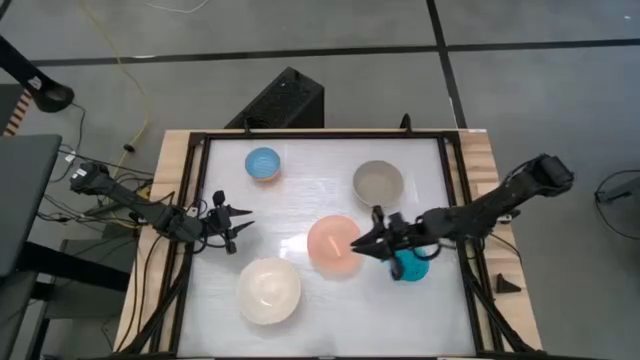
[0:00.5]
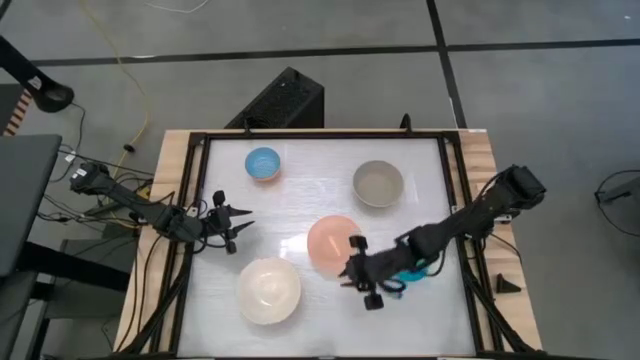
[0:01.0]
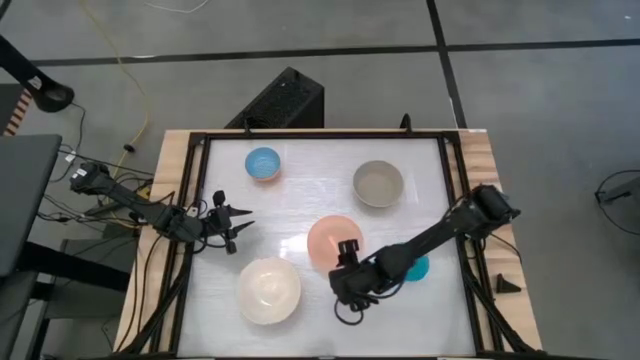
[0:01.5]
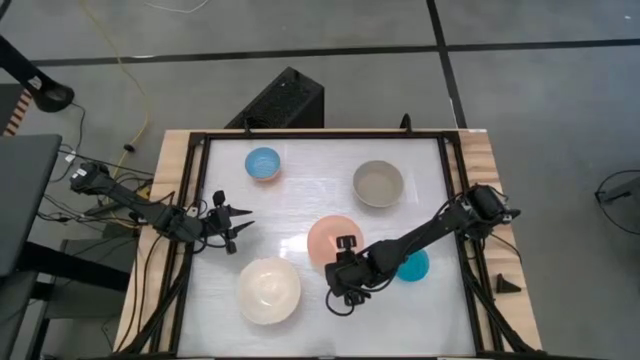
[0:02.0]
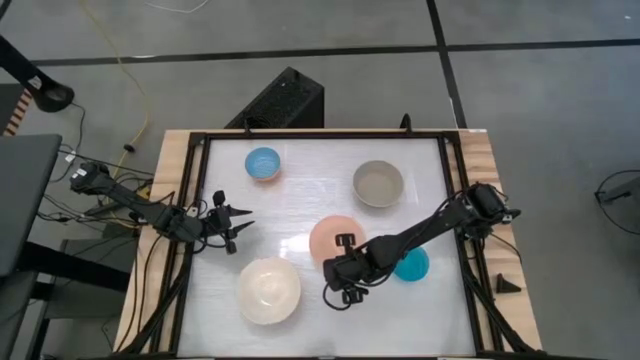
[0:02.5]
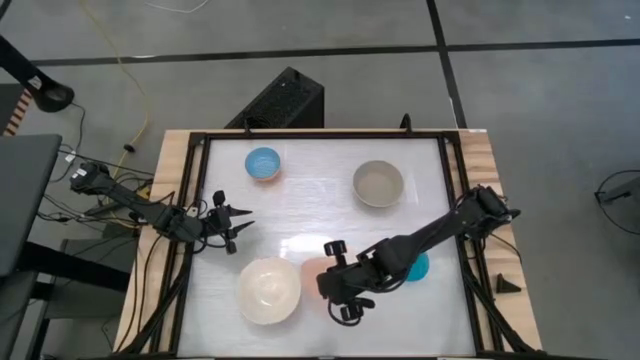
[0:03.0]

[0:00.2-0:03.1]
Stack the orange bowl on top of the white bowl

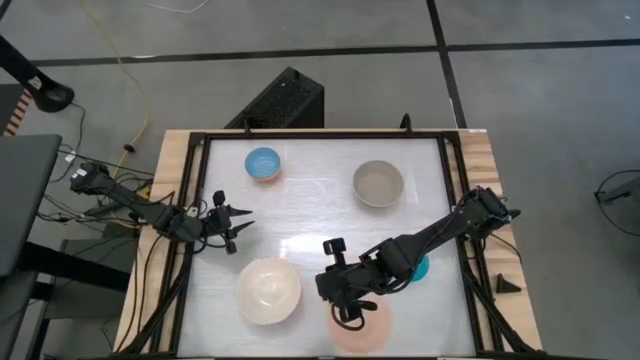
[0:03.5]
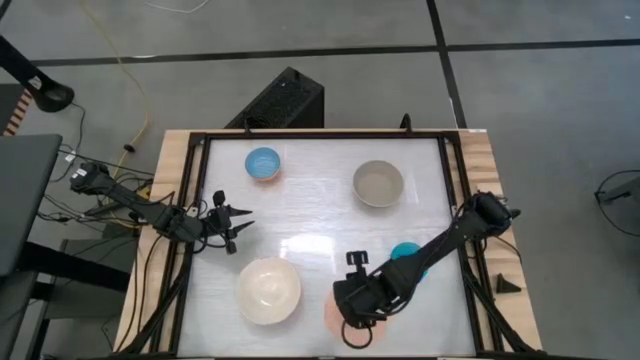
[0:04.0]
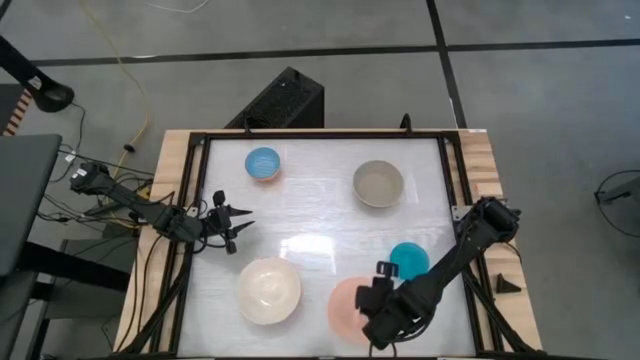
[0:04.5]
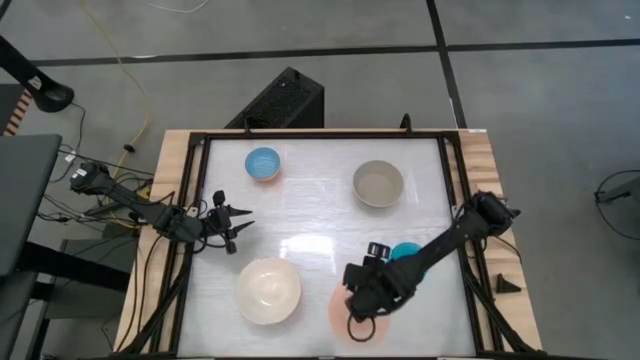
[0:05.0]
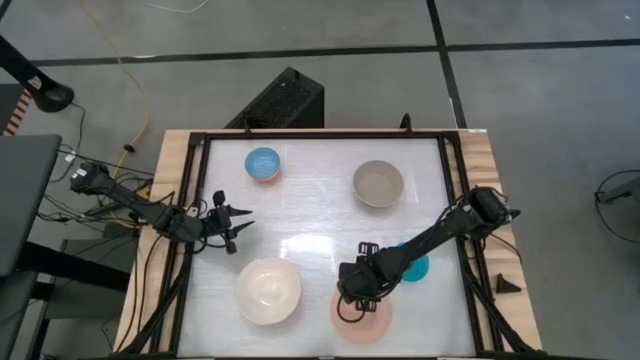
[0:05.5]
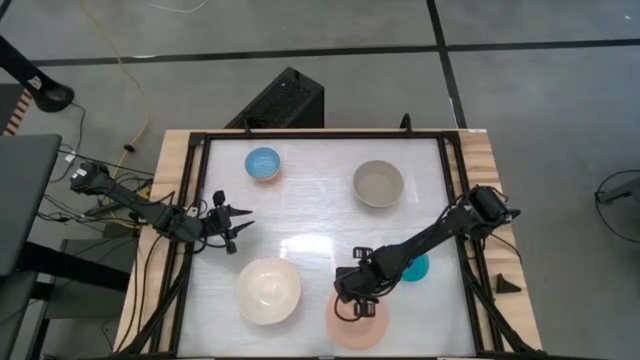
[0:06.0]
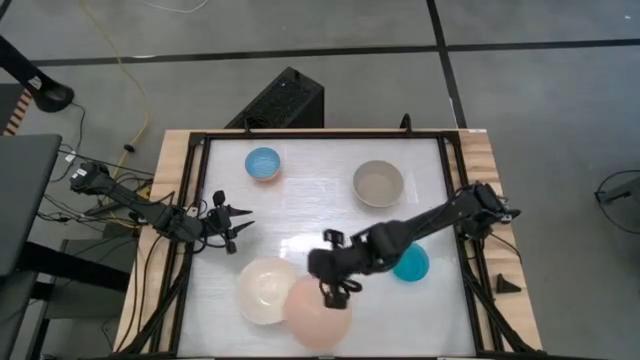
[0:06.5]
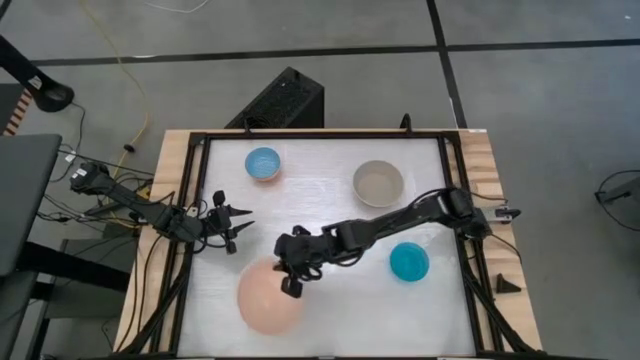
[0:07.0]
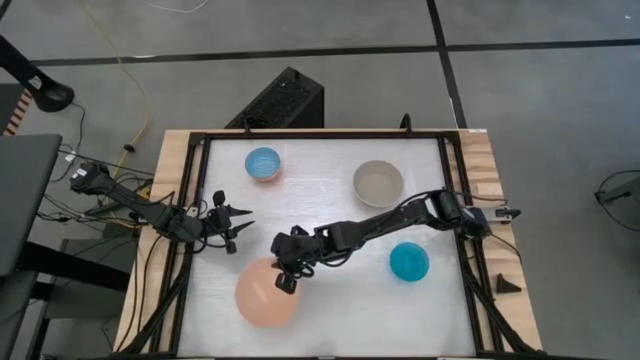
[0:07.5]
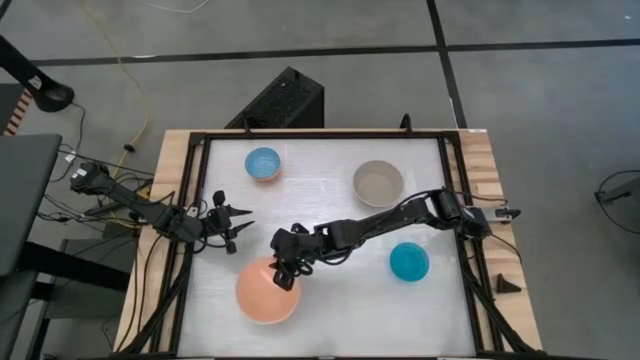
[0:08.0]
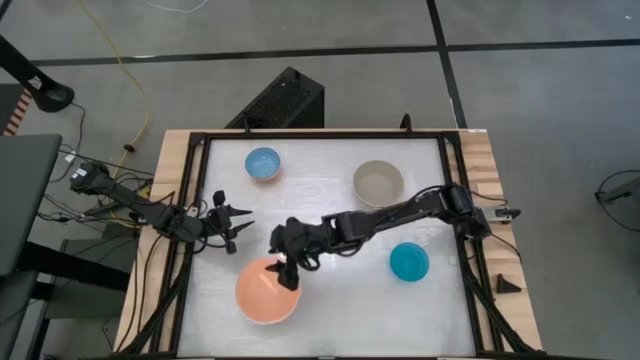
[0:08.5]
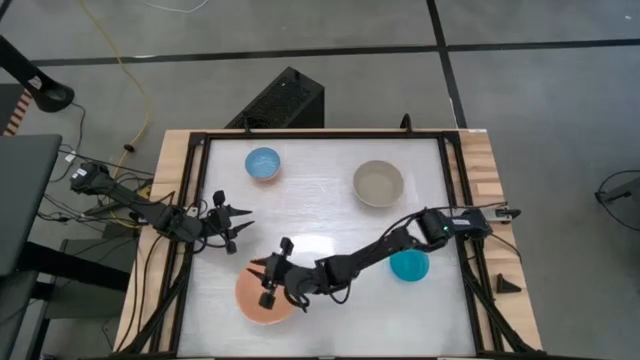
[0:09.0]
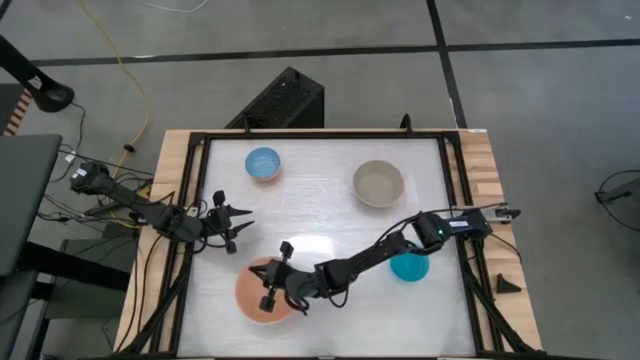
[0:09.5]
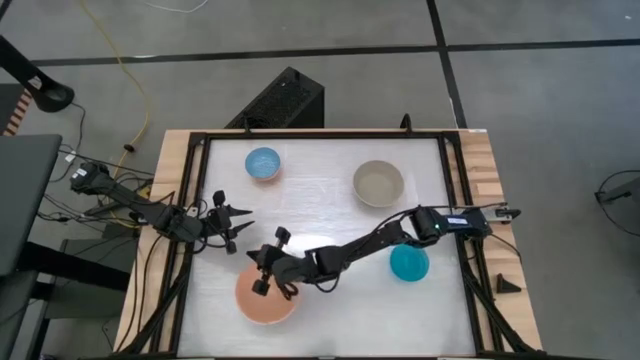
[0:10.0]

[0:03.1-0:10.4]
Stack the orange bowl on top of the white bowl

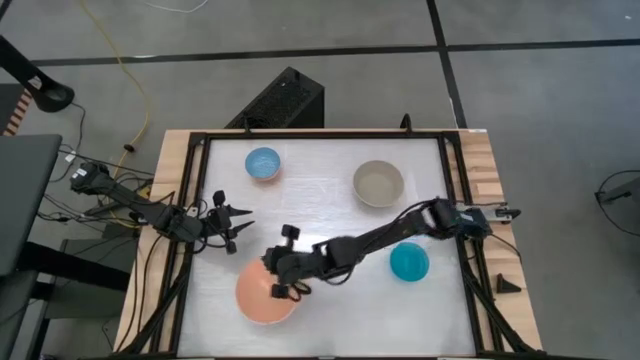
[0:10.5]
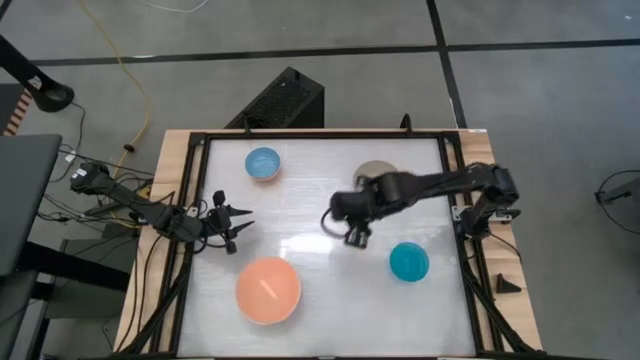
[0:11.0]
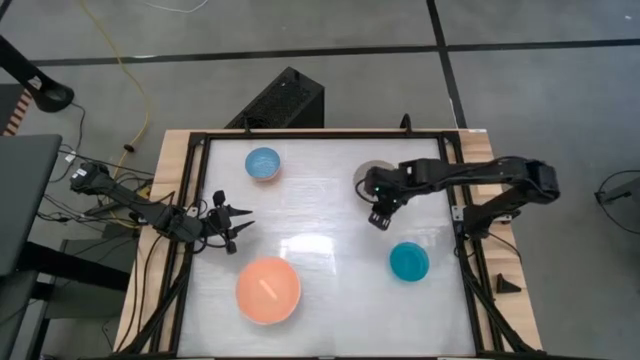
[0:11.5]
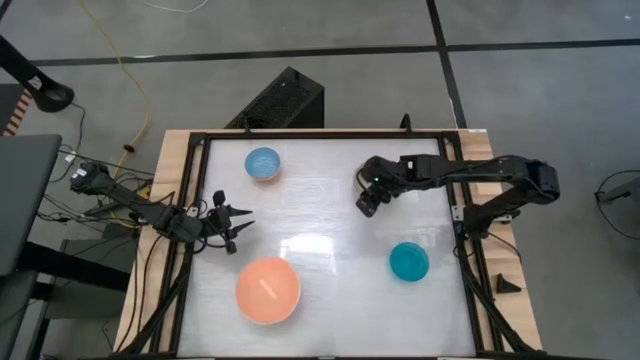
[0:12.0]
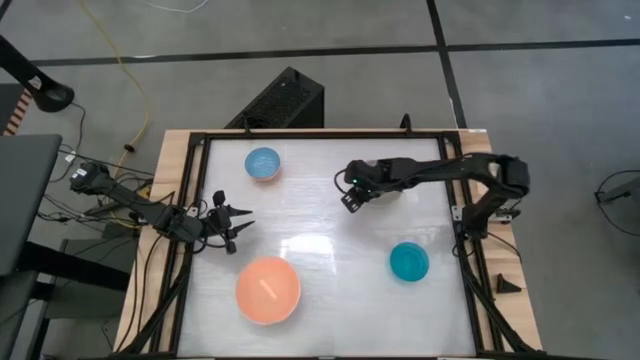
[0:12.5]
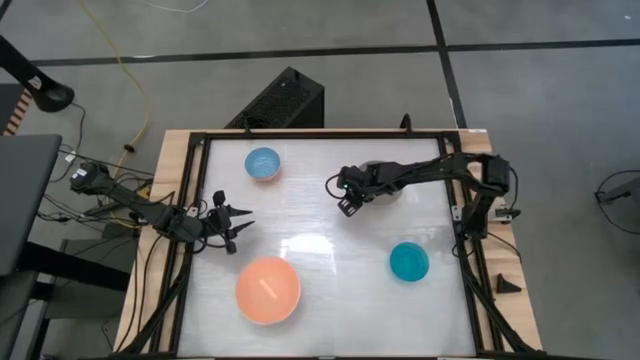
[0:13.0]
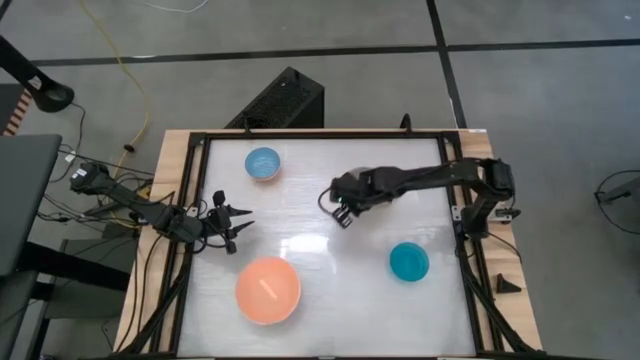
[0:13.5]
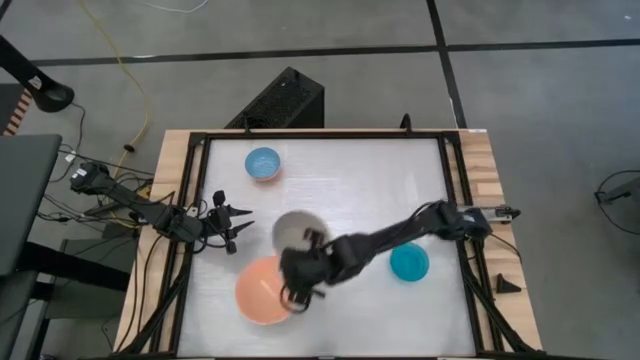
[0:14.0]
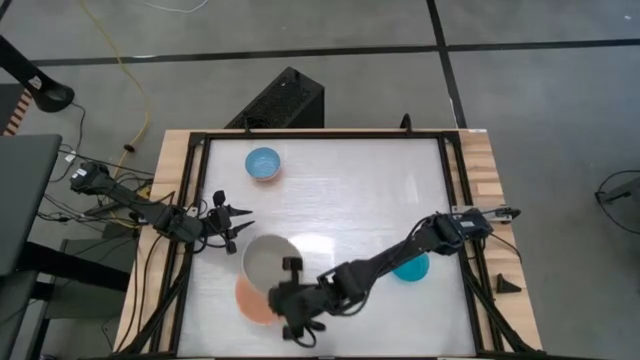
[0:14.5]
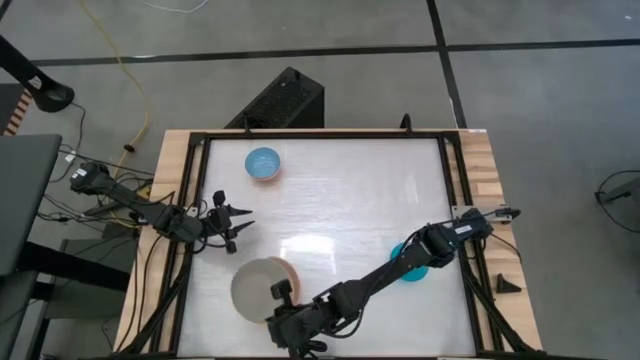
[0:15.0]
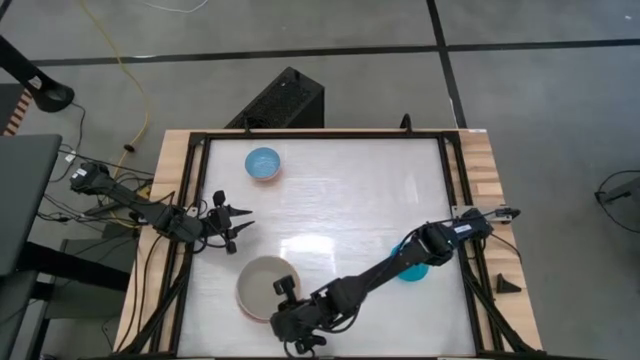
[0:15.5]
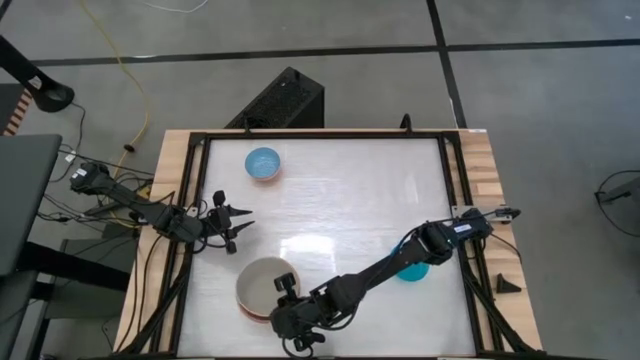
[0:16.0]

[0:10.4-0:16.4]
Stack the gray bowl on top of the orange bowl

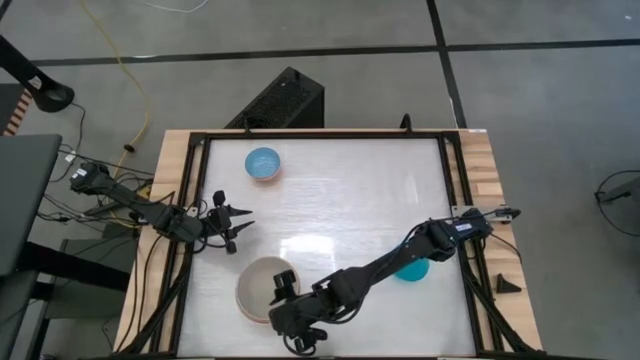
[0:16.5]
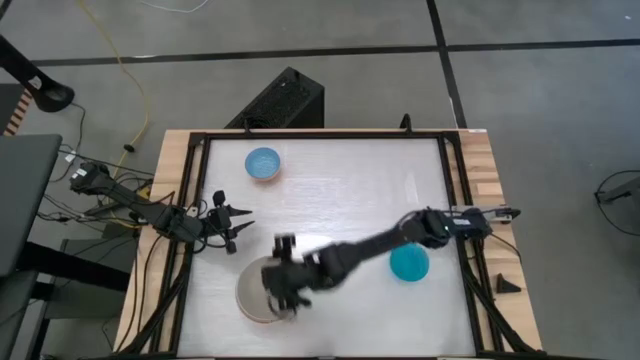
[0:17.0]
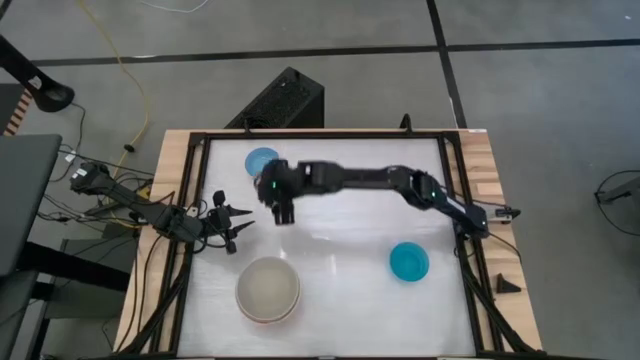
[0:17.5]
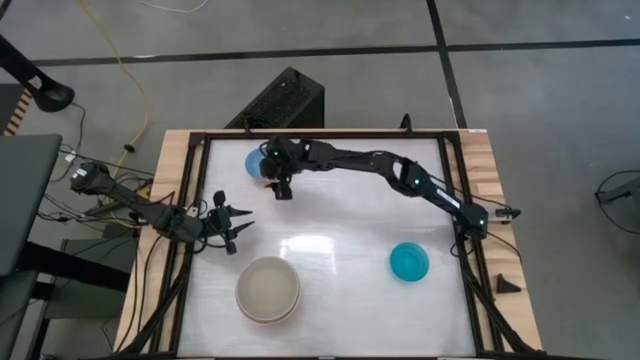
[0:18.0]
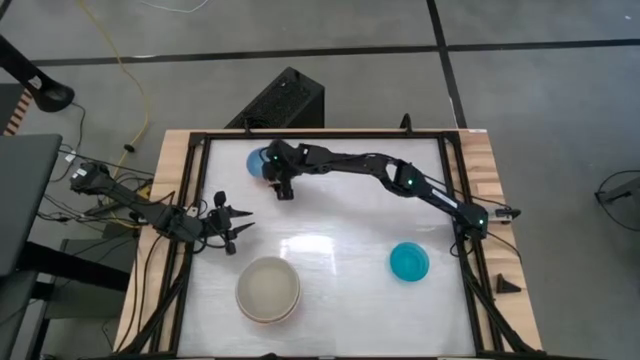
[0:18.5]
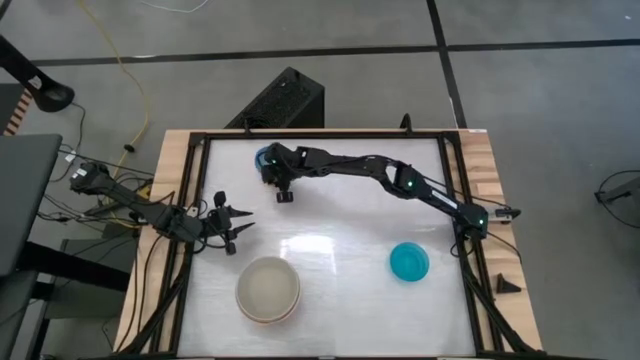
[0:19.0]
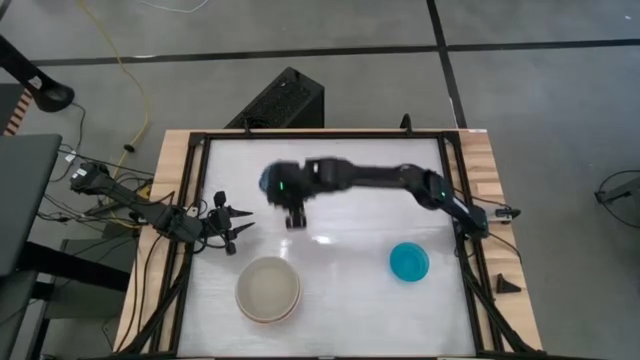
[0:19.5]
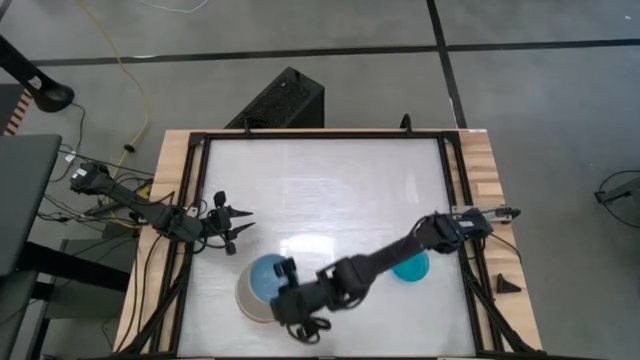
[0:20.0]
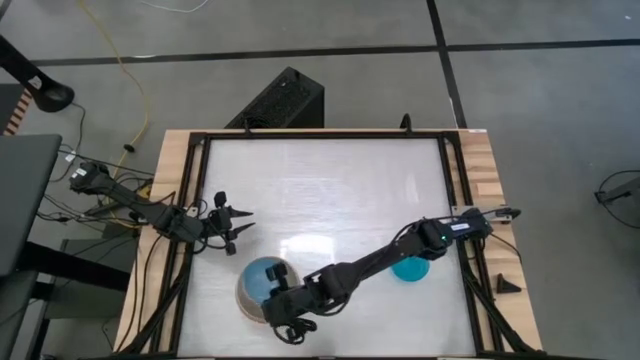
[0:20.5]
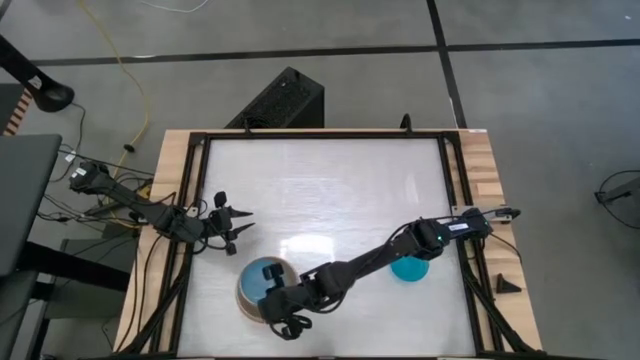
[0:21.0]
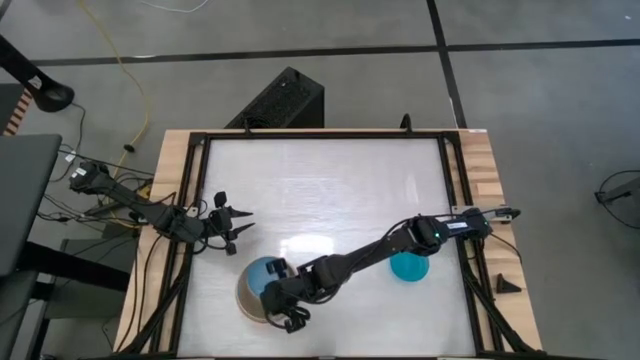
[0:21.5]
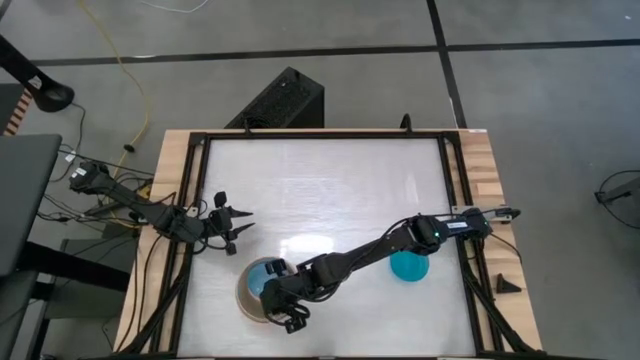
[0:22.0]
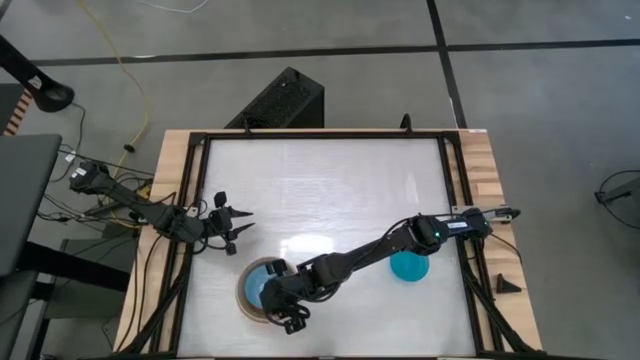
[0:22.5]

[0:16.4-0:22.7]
Stack the blue pattern bowl on top of the gray bowl
